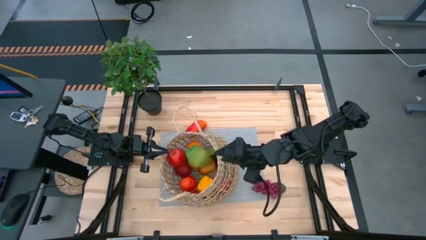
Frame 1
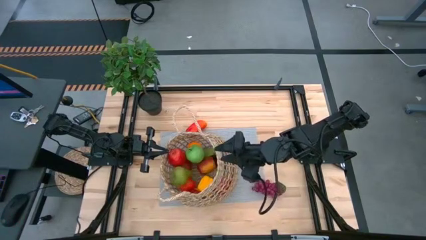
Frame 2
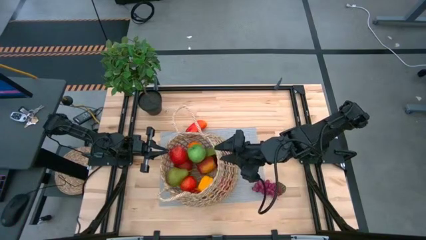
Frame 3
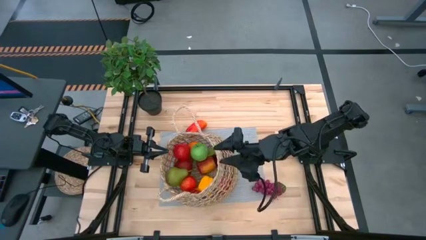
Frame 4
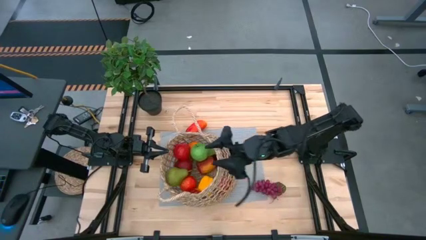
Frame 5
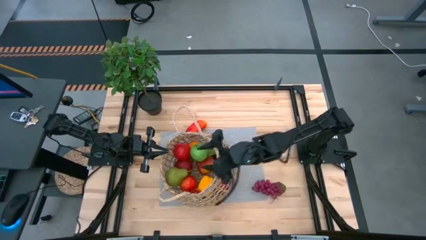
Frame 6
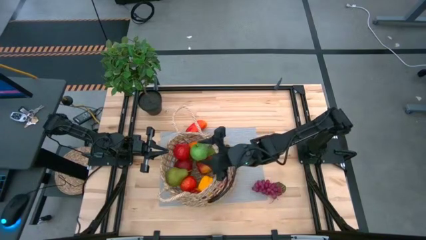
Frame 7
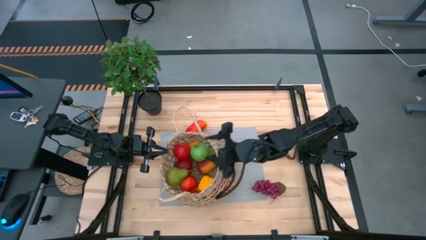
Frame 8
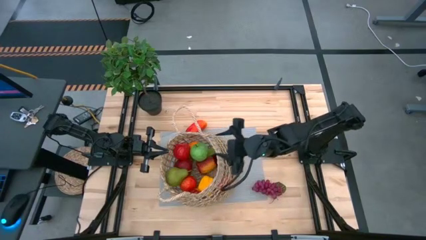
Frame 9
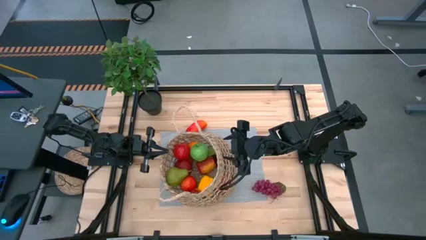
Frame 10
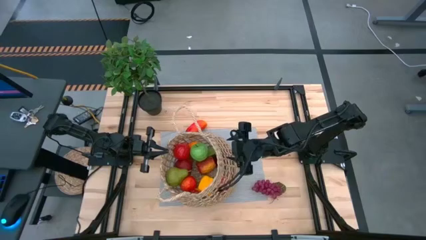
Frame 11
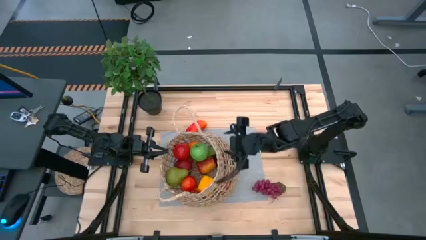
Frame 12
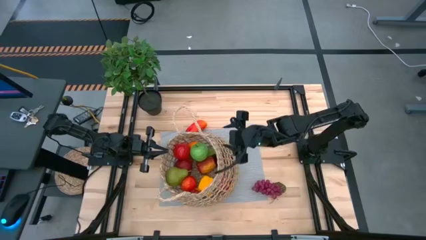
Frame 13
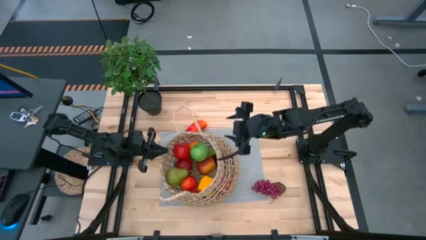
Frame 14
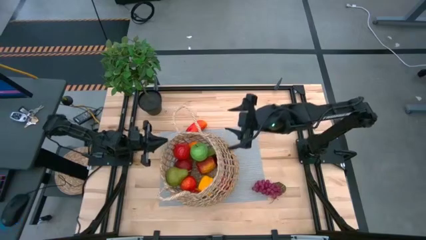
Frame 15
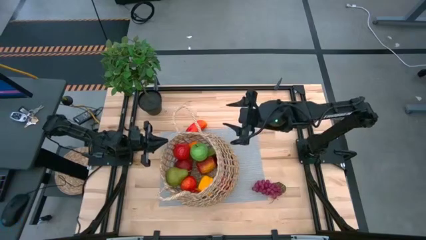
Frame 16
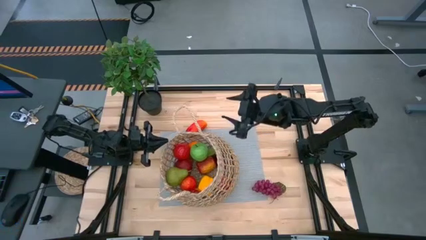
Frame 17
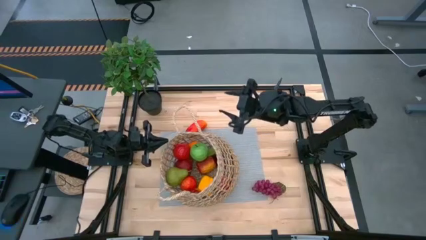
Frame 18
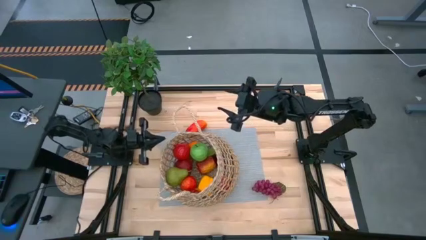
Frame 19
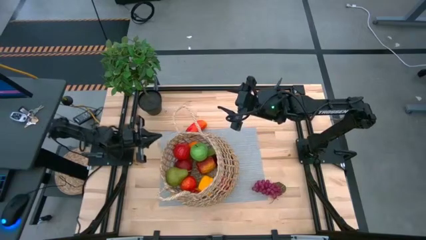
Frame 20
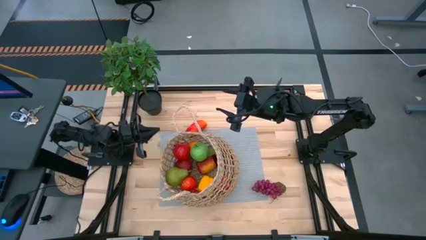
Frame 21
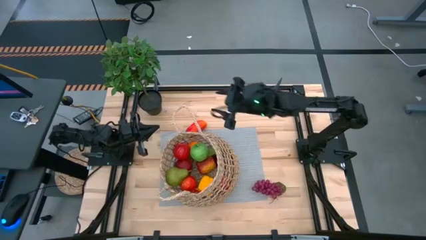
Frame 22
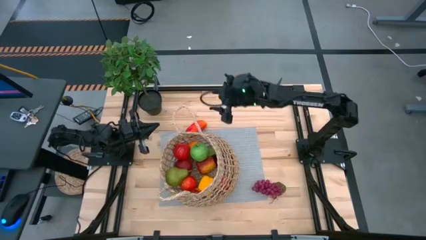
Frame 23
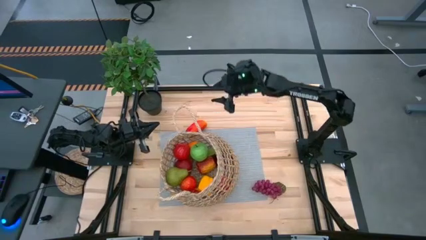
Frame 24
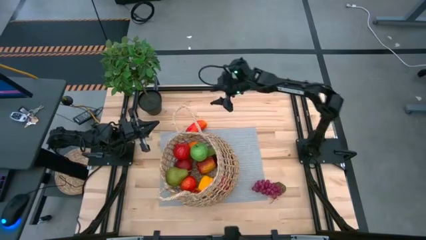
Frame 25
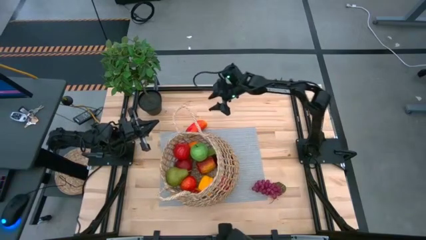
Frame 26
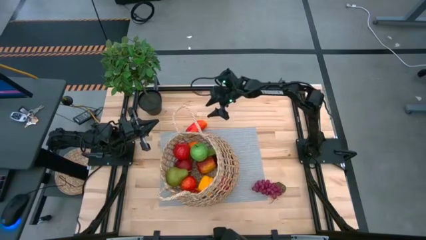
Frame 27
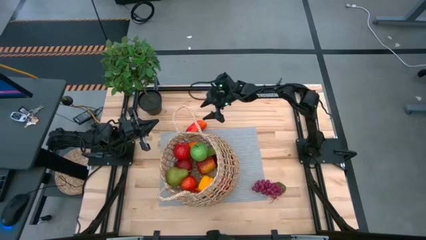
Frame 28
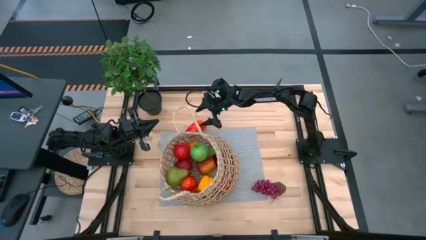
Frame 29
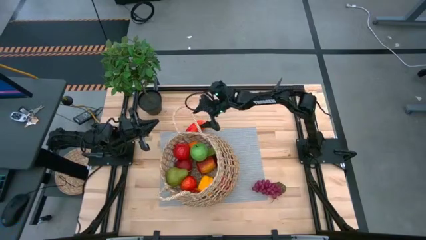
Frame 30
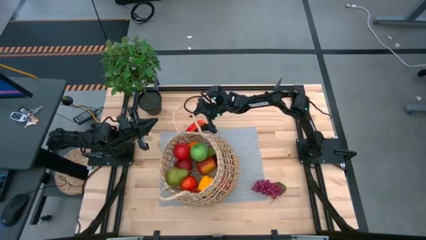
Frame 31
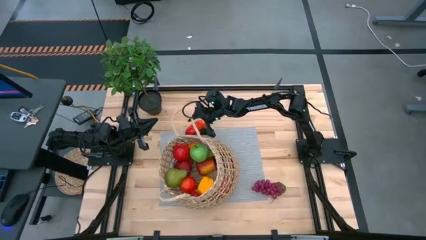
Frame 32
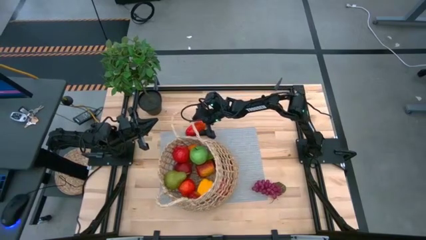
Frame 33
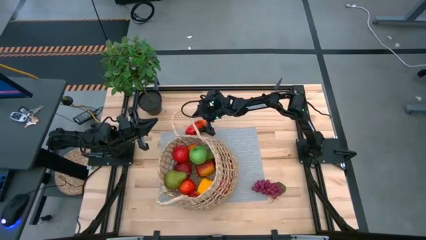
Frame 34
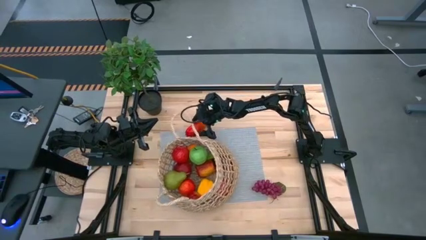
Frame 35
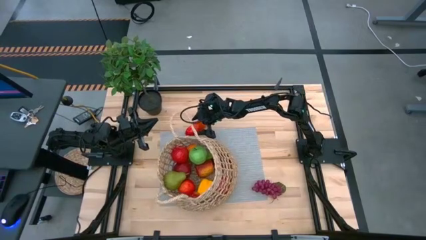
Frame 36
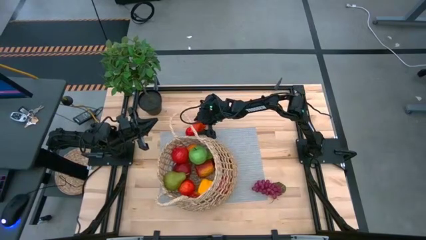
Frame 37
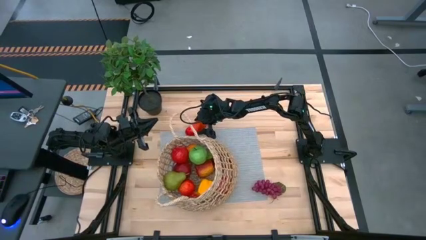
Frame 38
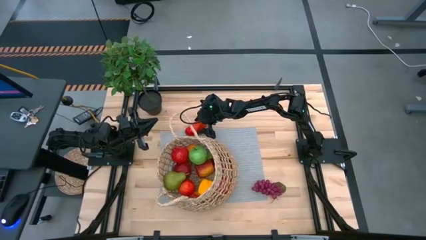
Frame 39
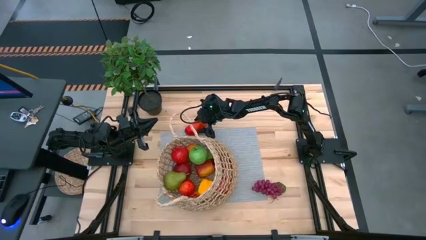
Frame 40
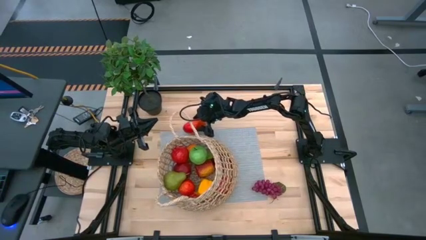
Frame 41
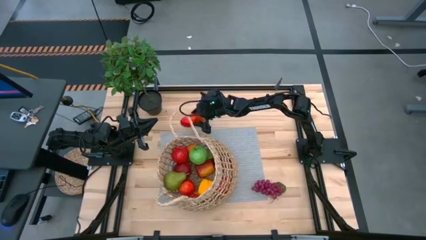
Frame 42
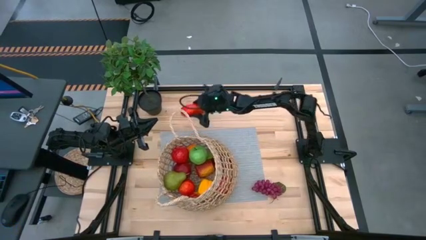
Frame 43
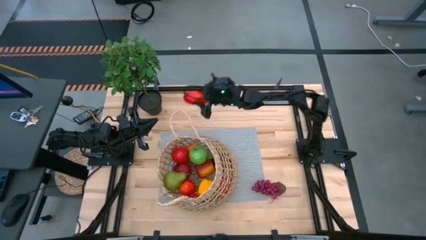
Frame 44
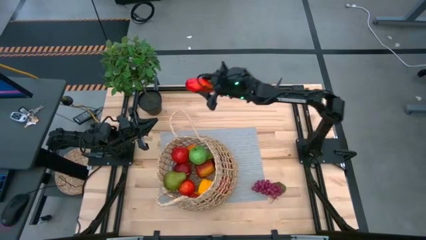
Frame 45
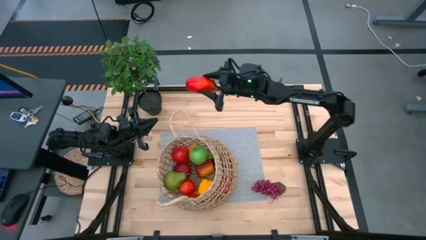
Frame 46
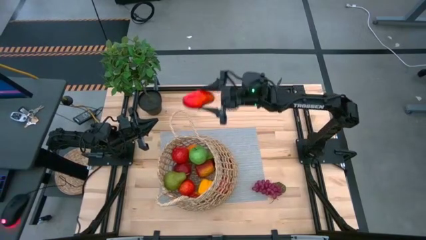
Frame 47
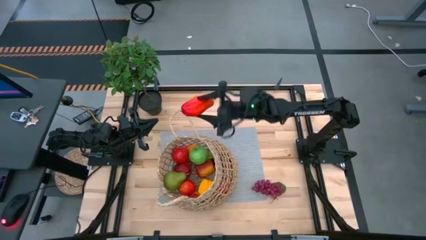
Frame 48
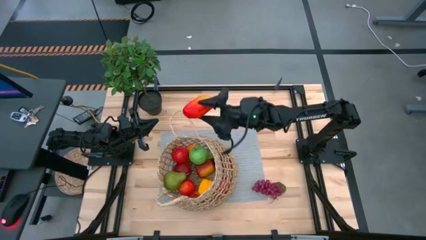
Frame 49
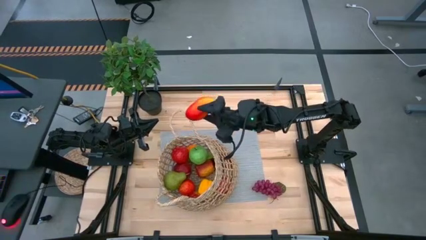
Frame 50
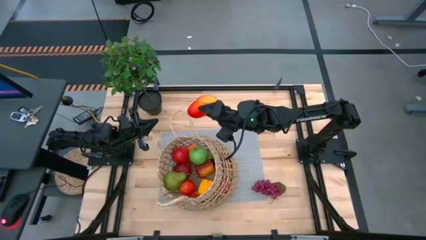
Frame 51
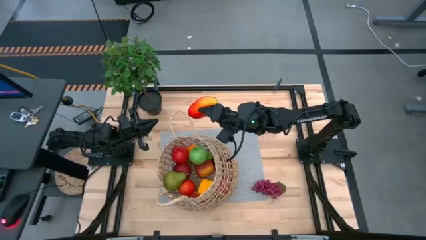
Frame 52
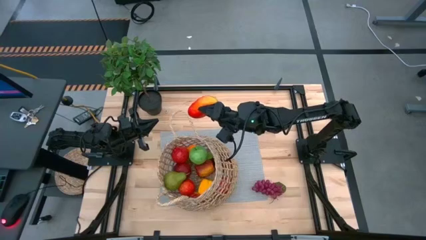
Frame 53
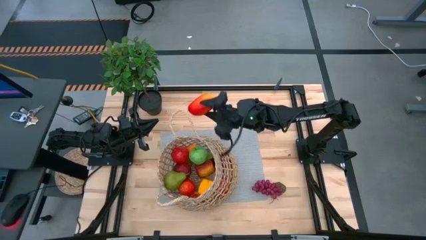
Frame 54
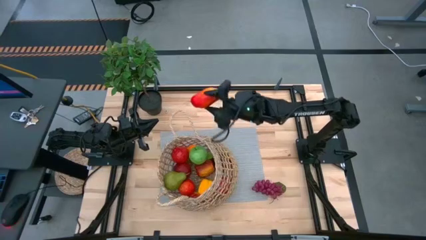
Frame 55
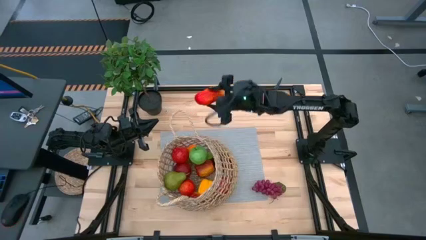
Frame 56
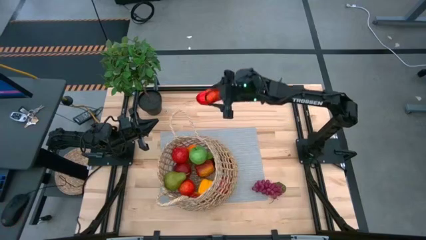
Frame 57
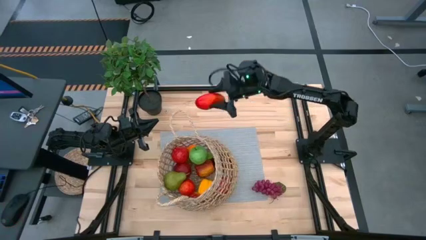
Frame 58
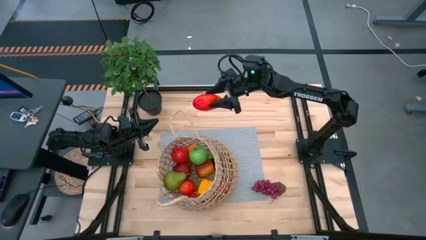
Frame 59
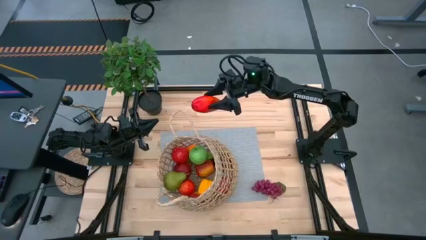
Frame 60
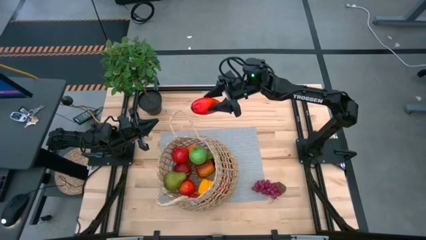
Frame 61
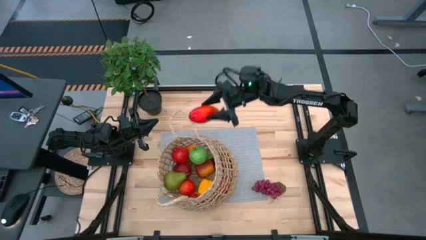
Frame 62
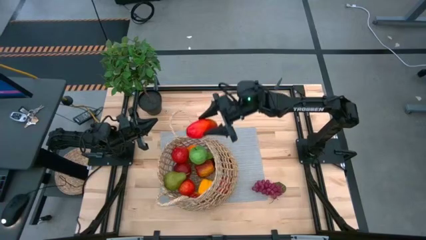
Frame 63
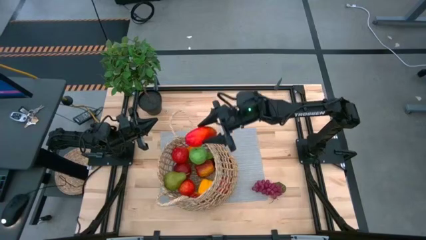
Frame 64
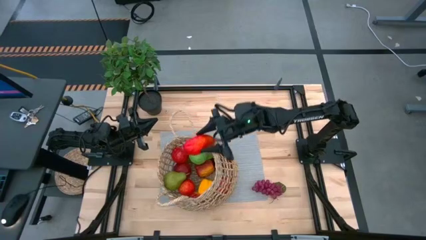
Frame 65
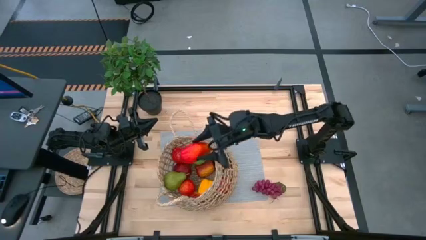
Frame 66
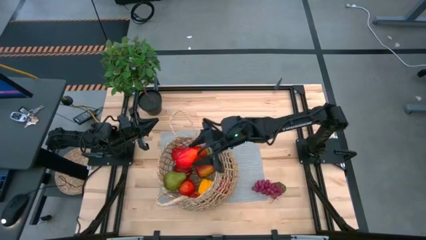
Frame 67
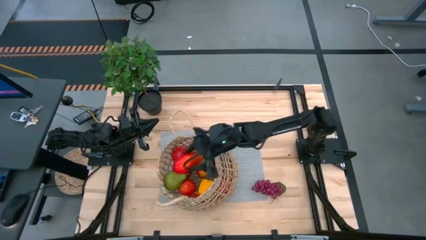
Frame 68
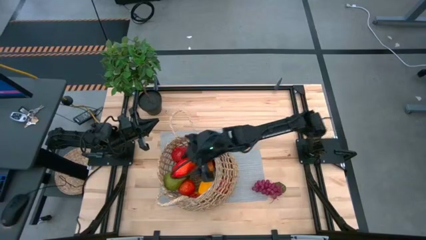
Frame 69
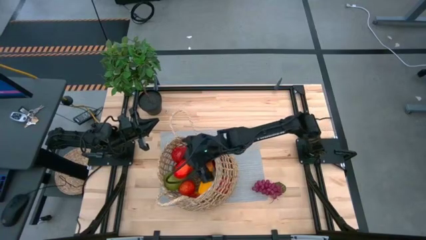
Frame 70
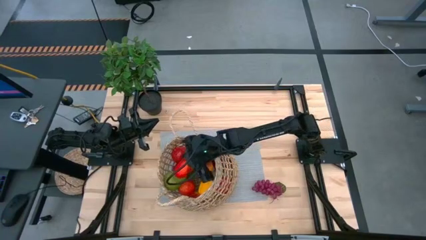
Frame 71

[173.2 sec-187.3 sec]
Task: Build produce basket
Put the red mango into the brown woven basket
